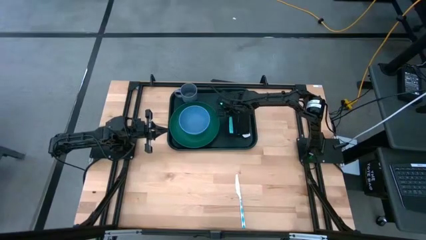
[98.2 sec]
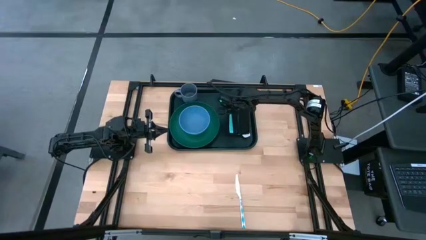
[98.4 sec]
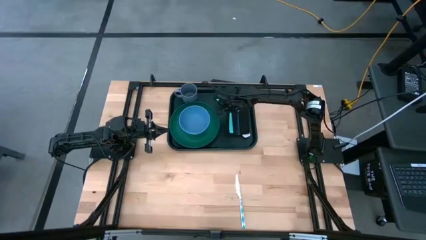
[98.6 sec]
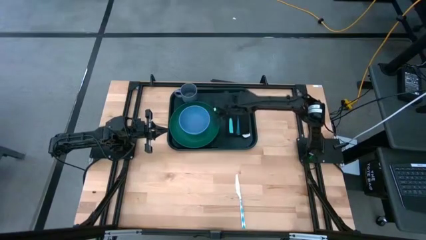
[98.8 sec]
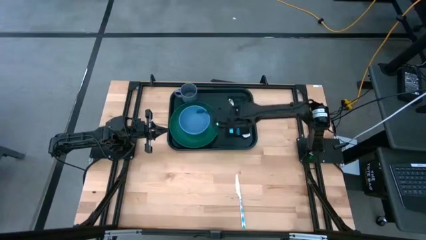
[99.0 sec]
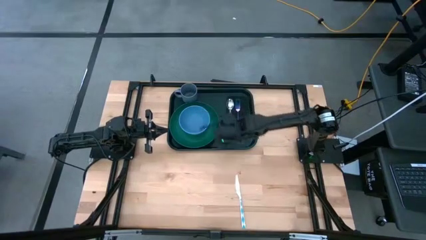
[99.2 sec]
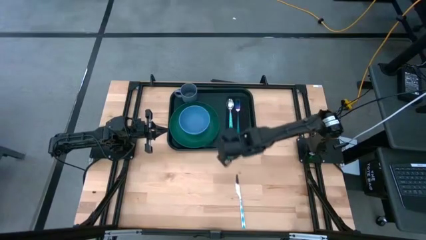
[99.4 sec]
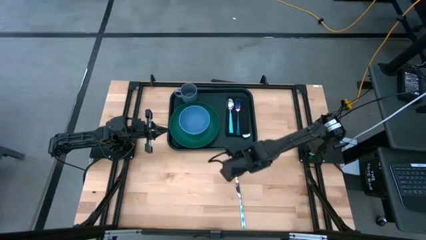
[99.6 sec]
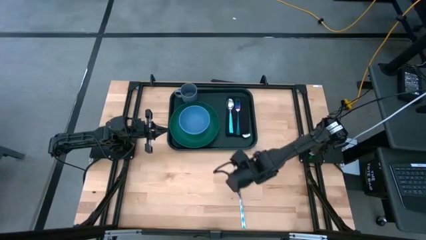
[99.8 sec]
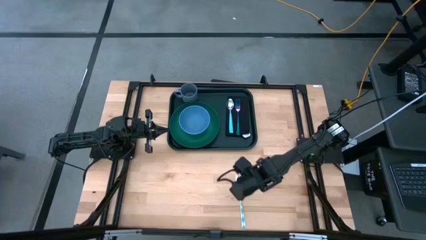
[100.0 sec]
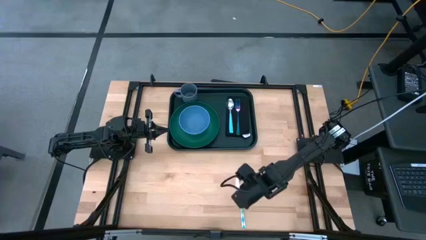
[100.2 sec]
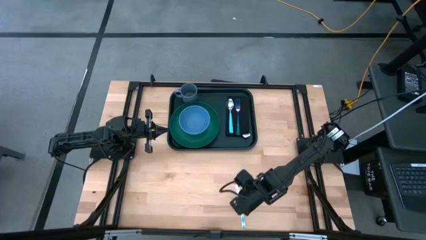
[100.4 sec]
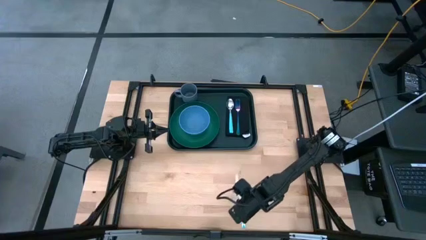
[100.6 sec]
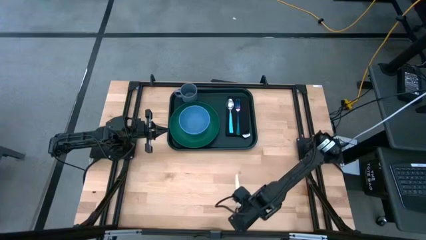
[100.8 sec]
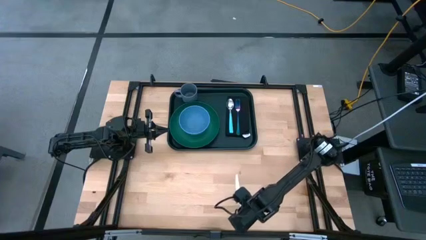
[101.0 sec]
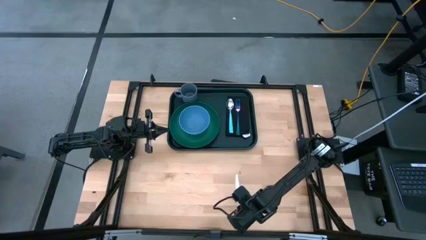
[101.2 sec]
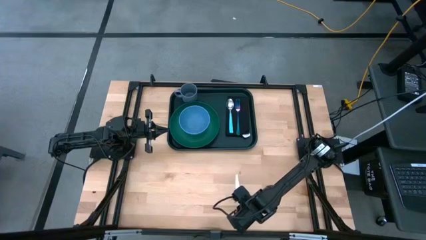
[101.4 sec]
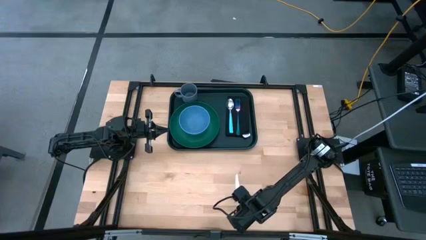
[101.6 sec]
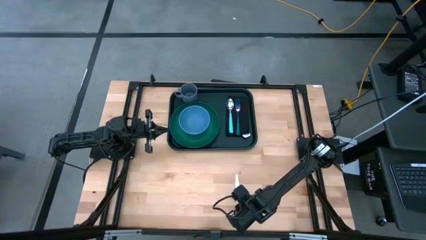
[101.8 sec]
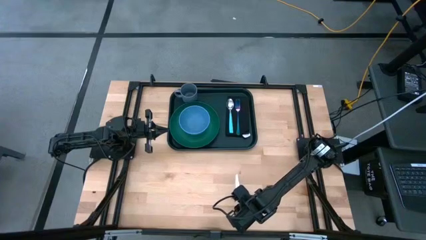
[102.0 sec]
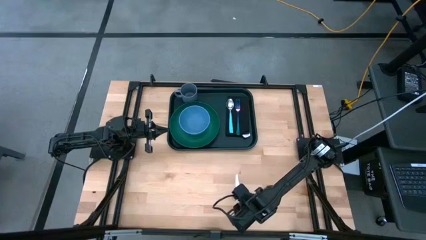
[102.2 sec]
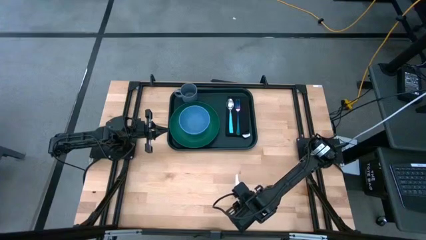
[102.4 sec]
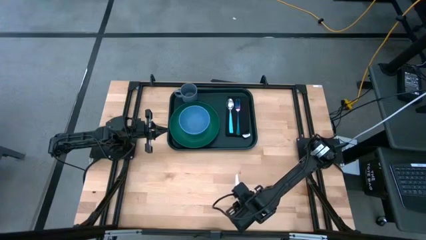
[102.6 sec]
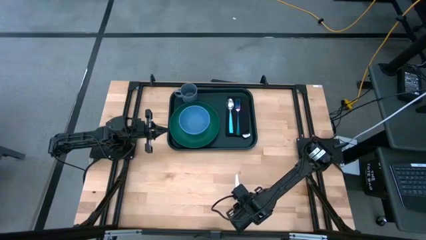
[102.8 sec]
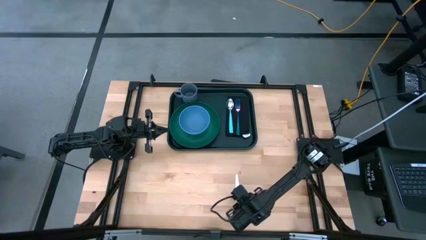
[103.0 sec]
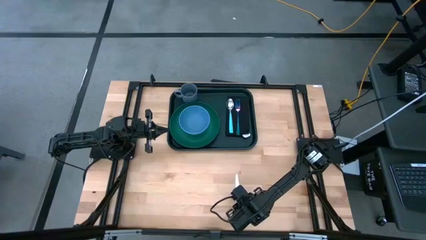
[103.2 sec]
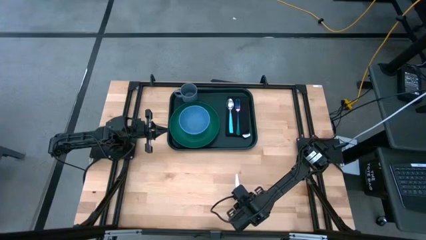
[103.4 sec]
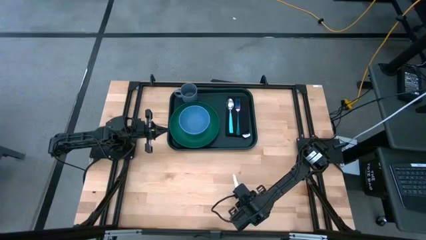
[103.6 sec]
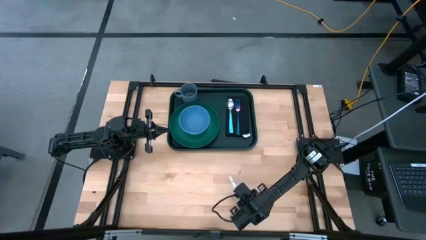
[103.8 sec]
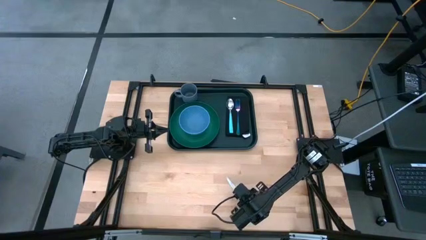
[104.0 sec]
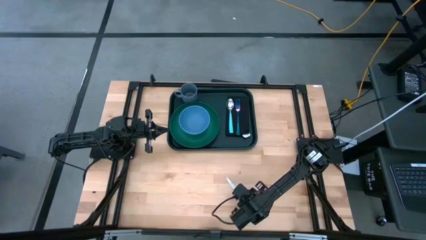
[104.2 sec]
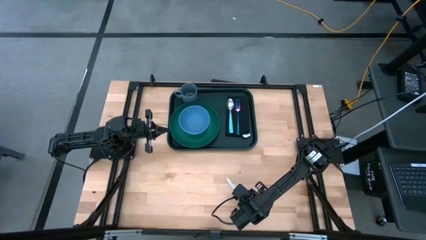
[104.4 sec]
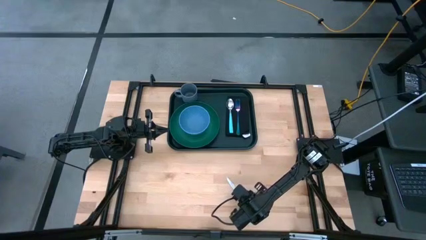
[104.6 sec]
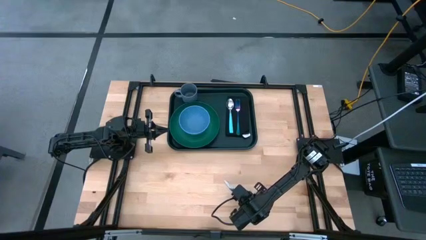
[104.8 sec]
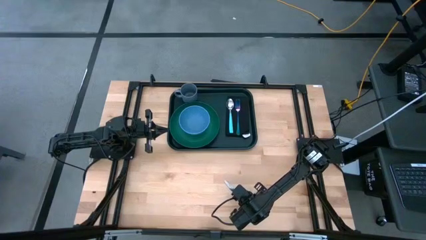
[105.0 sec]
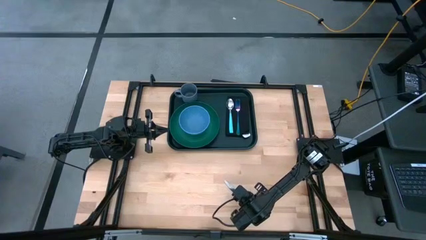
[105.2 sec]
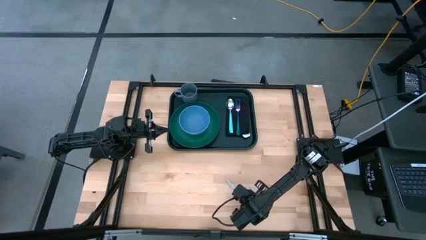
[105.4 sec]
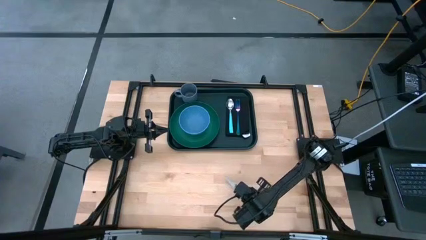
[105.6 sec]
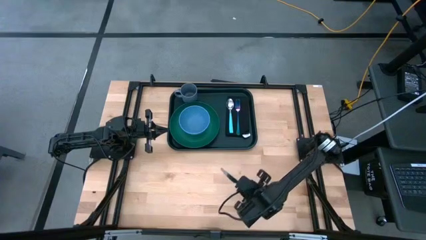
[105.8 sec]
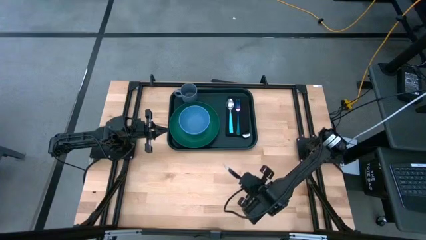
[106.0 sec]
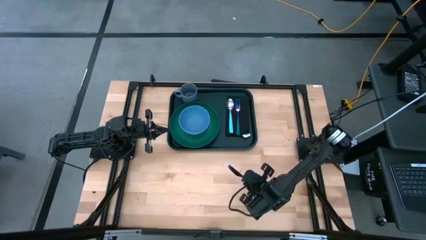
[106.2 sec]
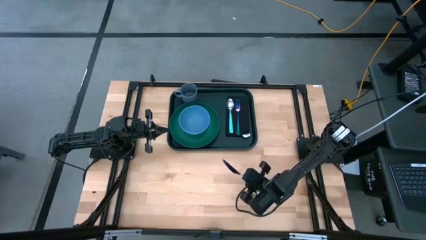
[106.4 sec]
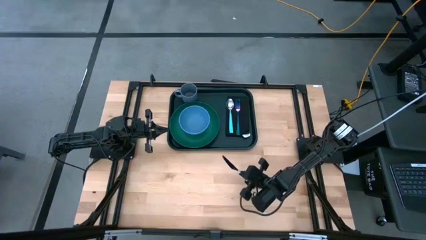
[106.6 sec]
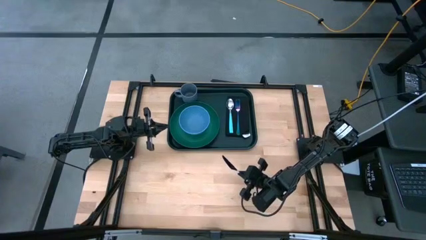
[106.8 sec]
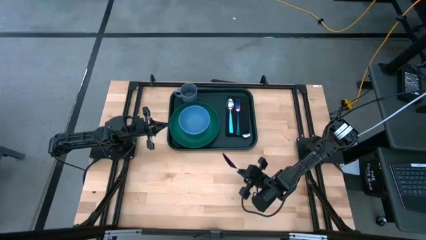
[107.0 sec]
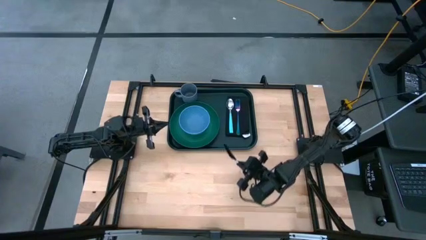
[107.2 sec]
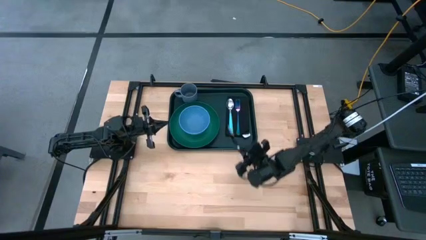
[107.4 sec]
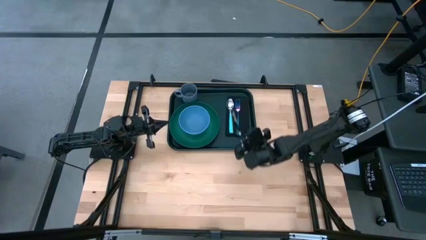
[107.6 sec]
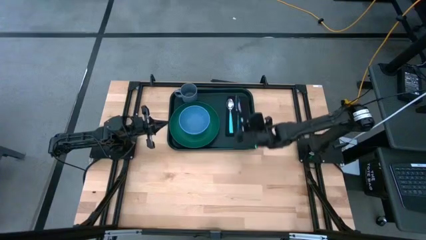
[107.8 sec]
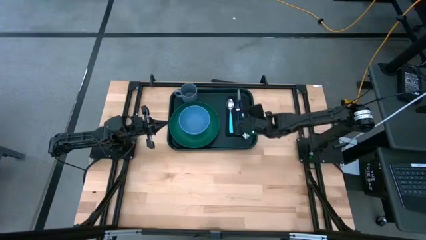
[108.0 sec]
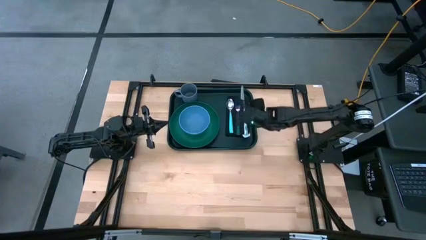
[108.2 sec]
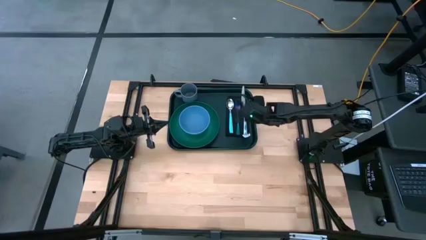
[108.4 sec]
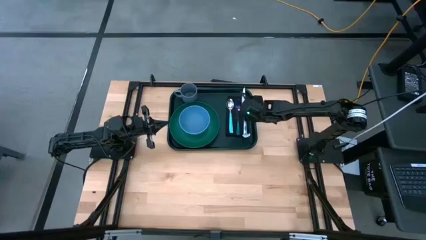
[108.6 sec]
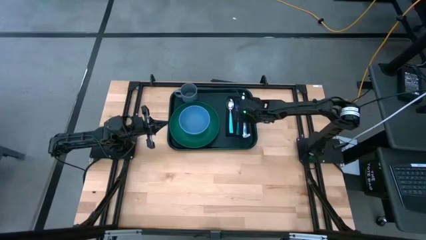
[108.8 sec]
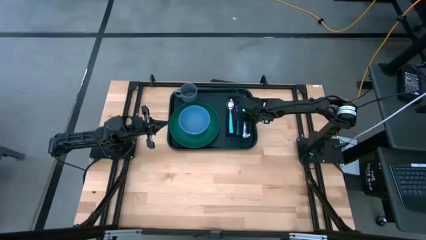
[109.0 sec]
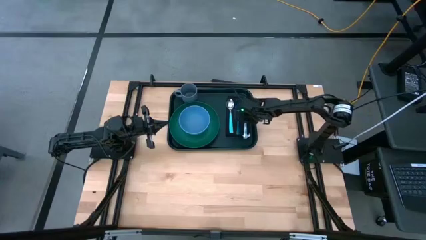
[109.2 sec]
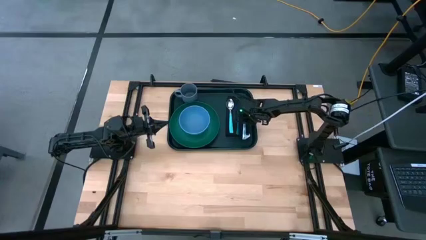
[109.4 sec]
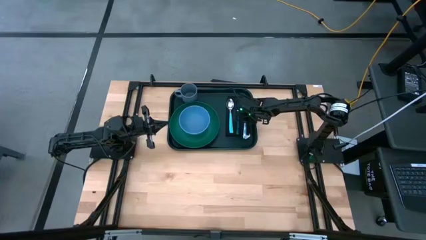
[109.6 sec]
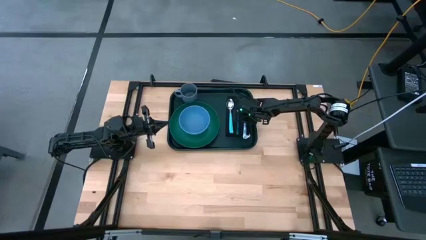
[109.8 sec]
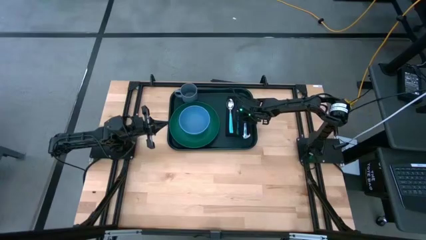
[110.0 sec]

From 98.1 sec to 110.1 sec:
Task: Set up tray
Put the blue patterned knife to the right of the fork on the black napkin

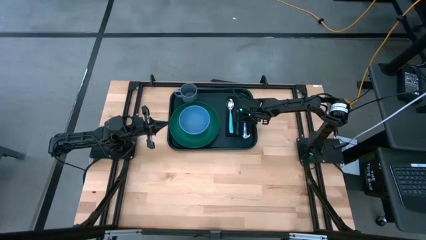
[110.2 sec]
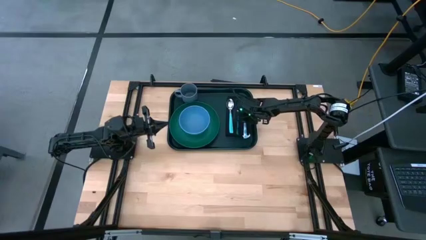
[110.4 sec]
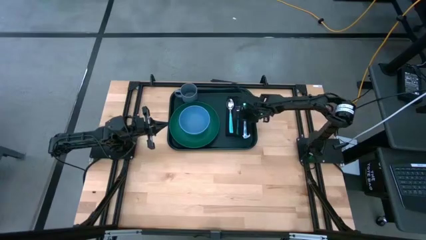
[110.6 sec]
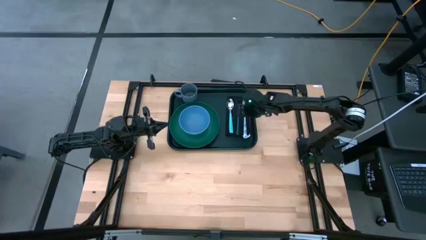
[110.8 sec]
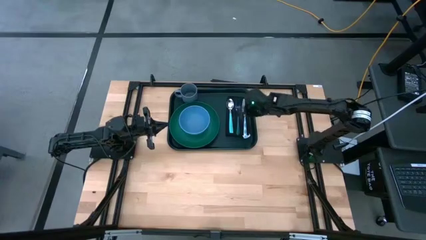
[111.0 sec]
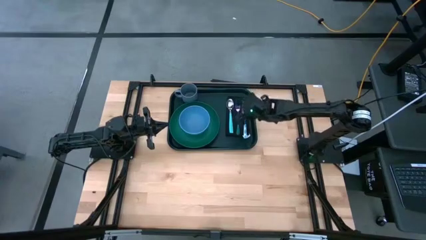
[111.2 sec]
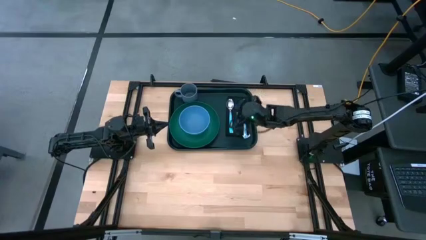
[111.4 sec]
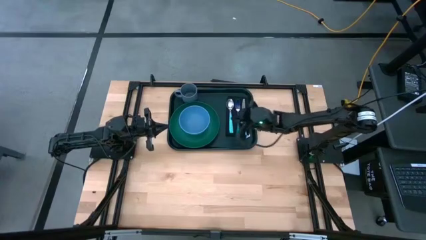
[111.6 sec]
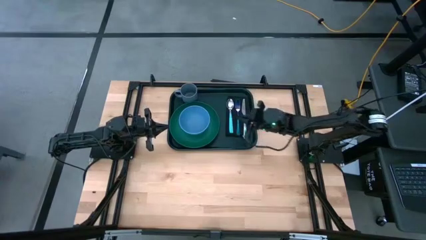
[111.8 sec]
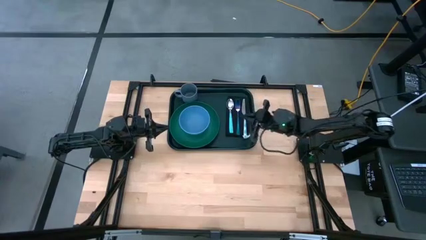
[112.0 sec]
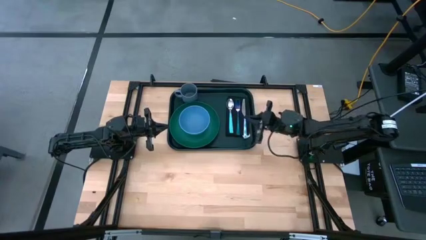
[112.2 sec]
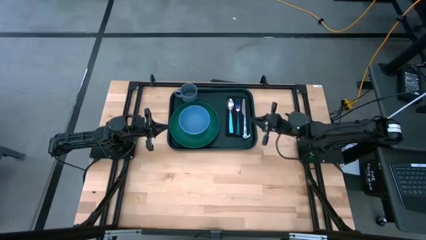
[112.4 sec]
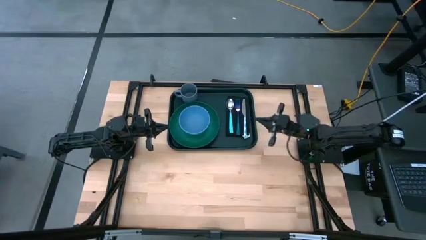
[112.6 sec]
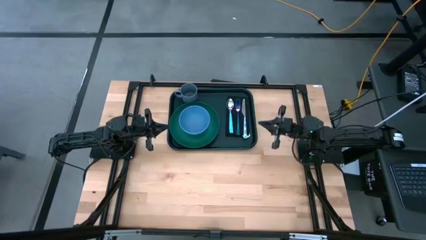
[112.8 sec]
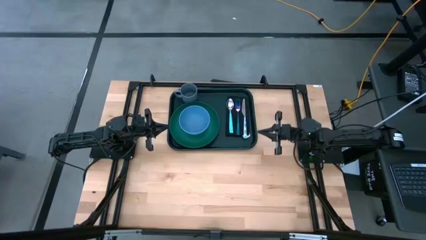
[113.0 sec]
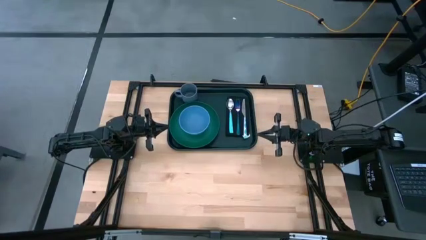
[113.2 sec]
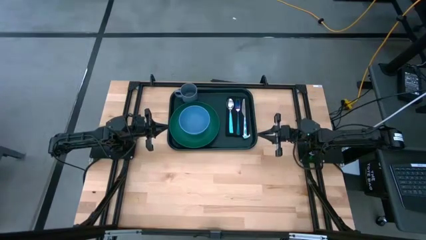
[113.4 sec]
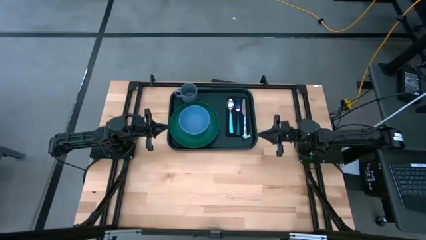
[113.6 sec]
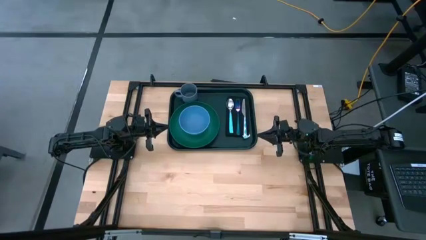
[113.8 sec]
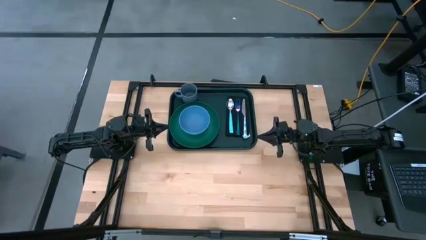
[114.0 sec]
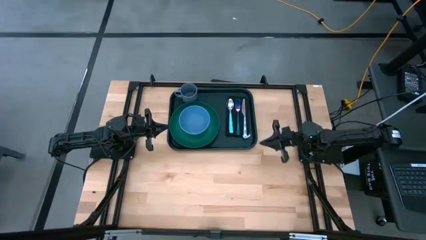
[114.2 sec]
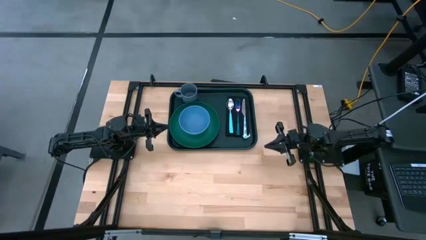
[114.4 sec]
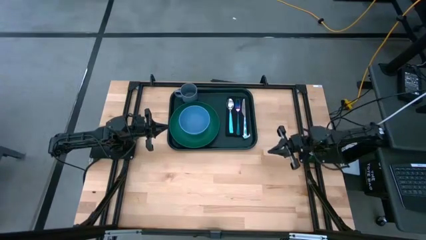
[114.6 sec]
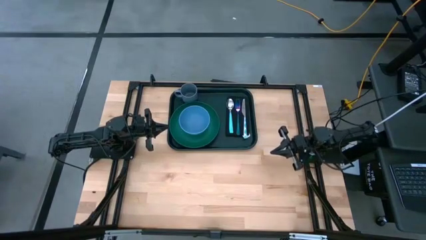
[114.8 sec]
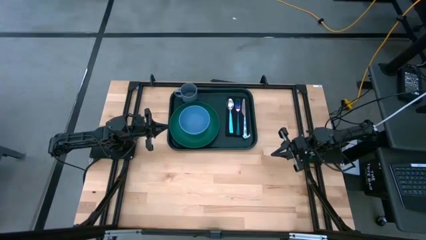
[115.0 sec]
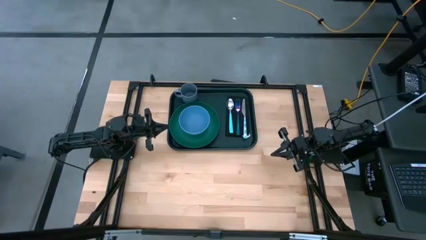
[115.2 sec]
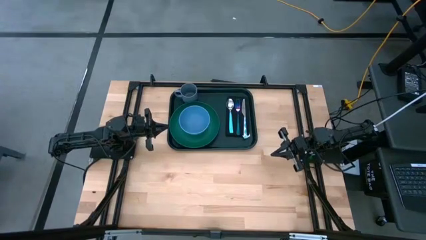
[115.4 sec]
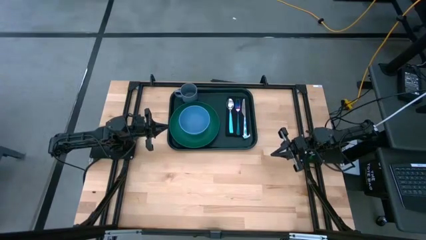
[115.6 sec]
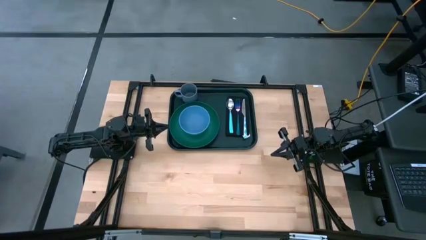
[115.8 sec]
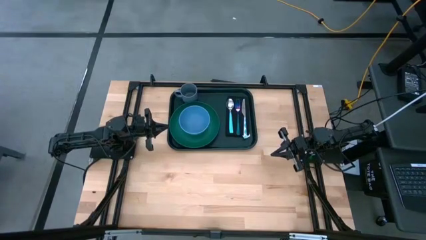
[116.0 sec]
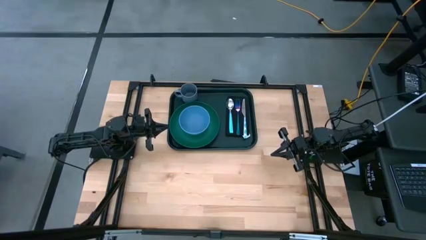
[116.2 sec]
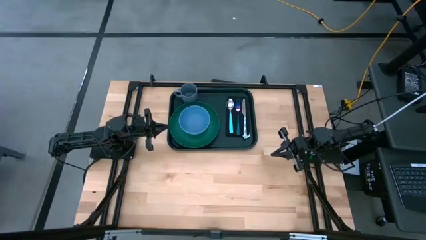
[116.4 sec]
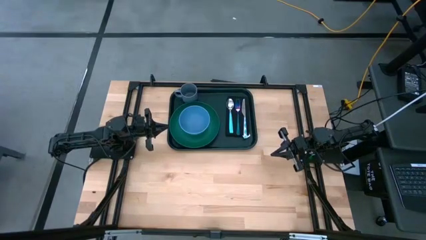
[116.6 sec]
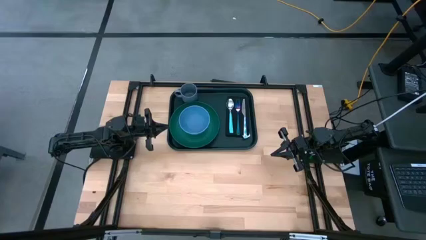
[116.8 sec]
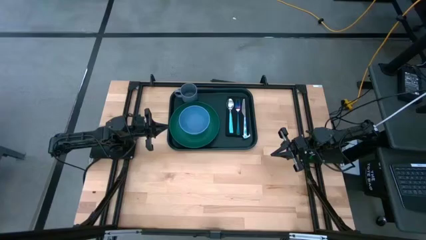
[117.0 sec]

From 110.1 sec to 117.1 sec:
Return to Home Position
